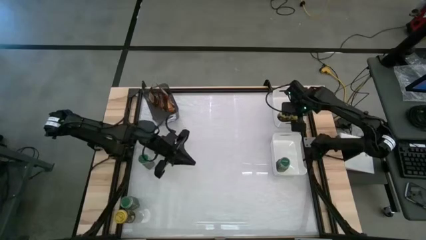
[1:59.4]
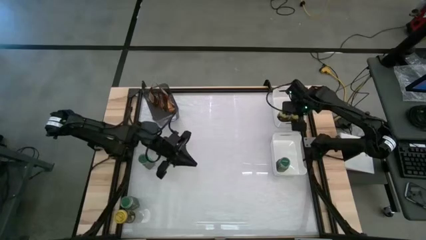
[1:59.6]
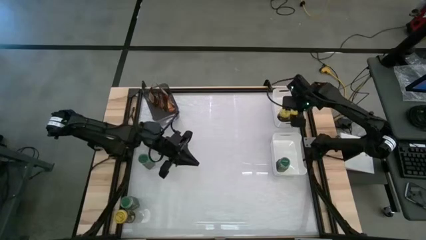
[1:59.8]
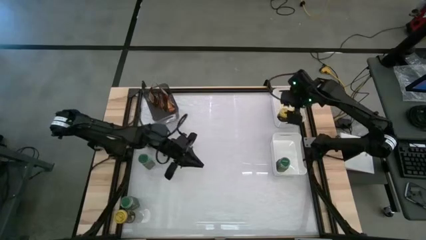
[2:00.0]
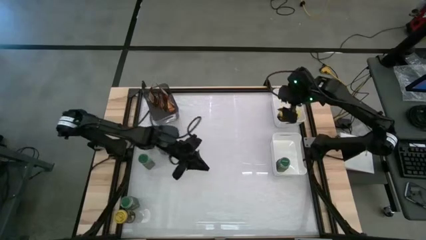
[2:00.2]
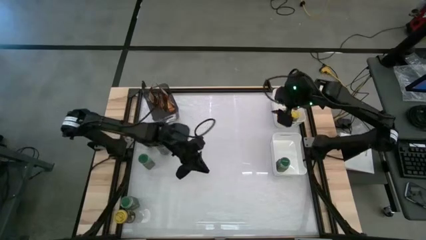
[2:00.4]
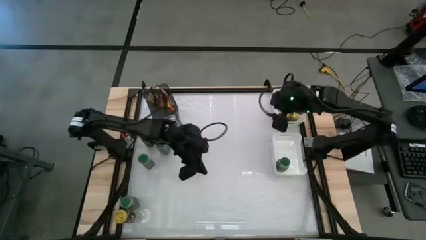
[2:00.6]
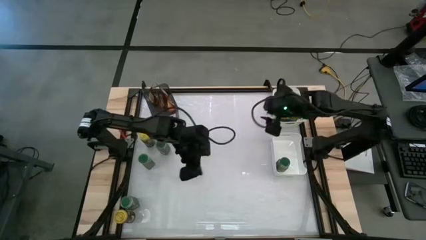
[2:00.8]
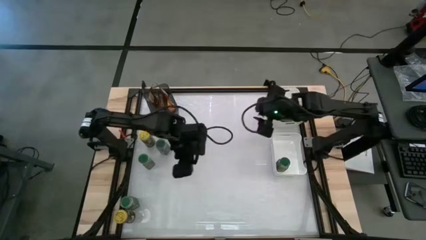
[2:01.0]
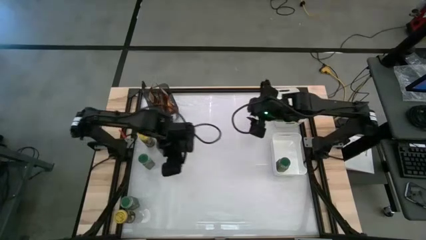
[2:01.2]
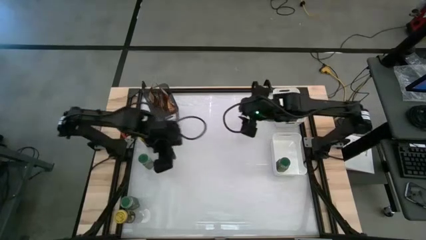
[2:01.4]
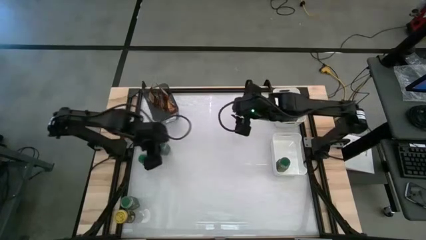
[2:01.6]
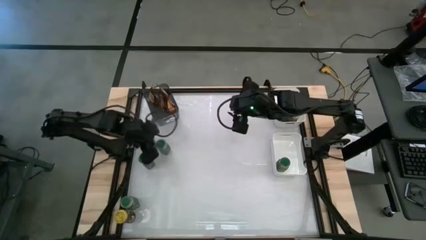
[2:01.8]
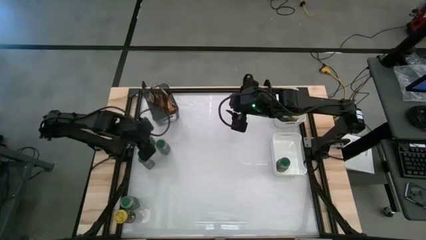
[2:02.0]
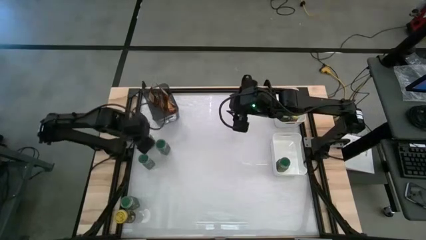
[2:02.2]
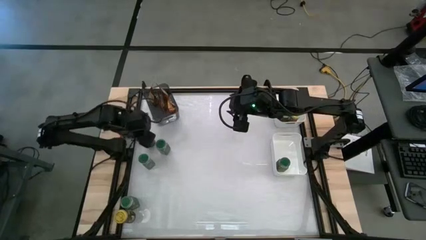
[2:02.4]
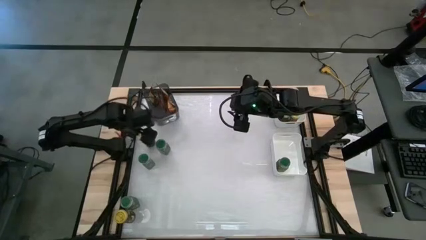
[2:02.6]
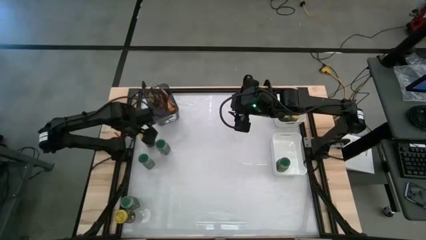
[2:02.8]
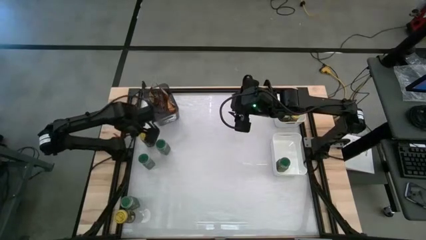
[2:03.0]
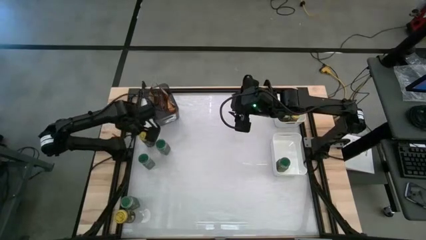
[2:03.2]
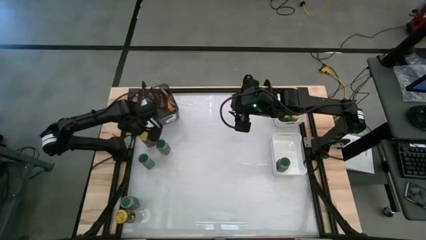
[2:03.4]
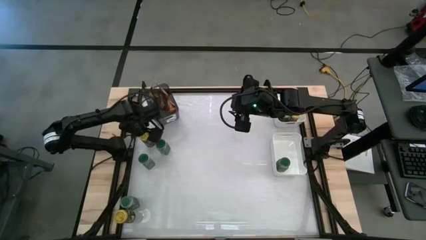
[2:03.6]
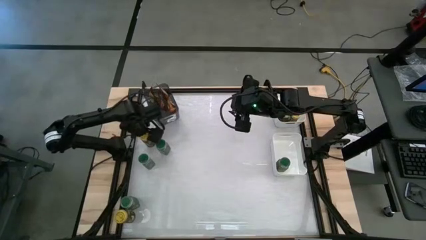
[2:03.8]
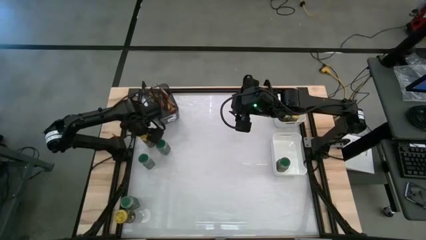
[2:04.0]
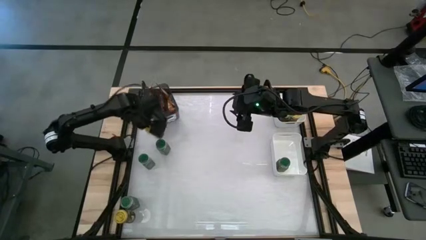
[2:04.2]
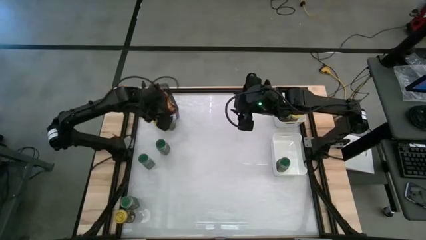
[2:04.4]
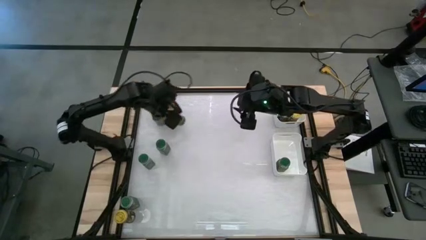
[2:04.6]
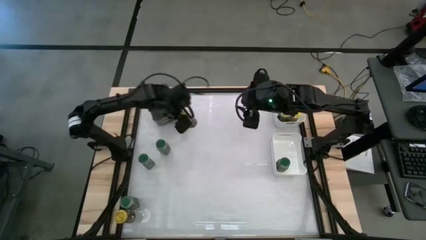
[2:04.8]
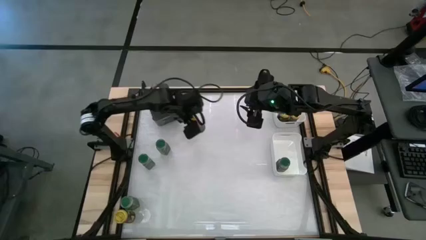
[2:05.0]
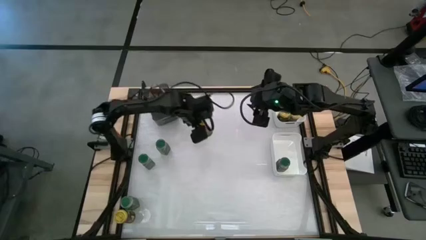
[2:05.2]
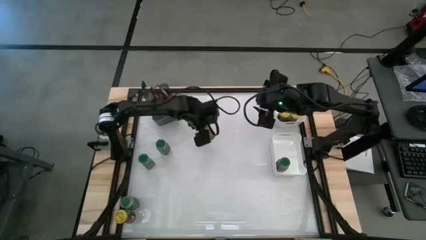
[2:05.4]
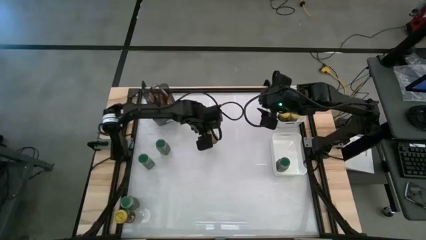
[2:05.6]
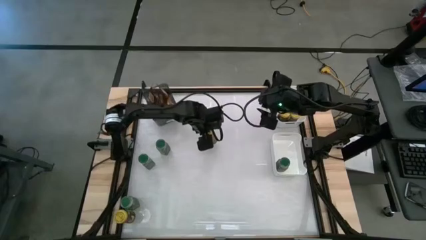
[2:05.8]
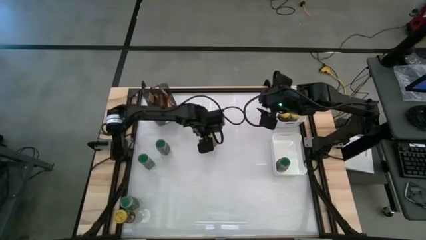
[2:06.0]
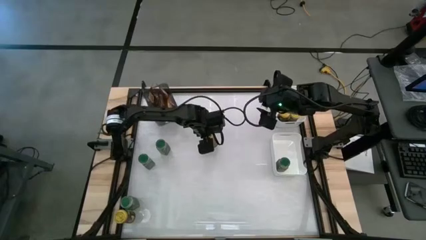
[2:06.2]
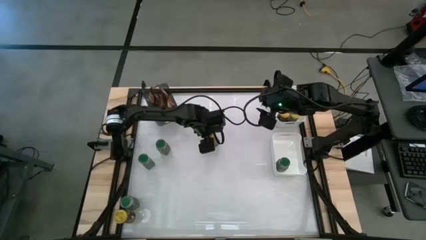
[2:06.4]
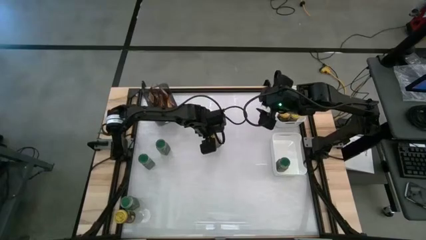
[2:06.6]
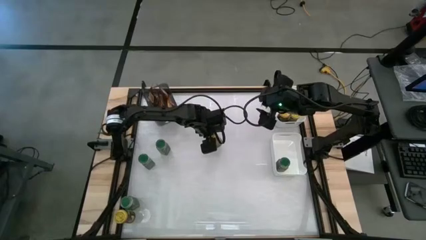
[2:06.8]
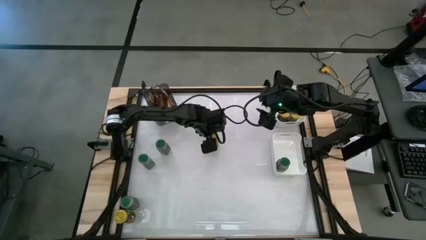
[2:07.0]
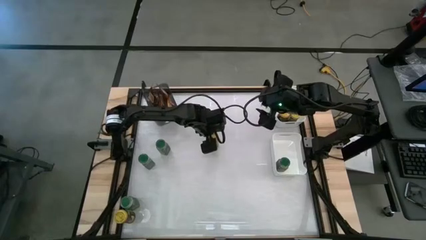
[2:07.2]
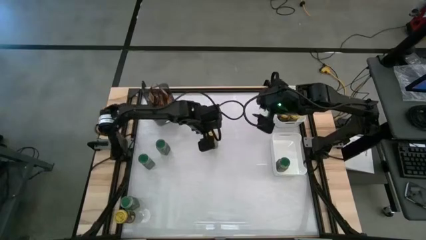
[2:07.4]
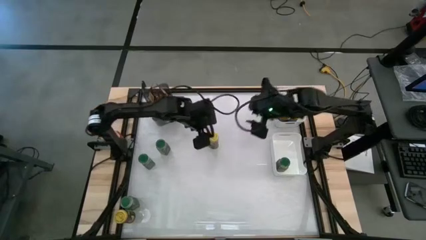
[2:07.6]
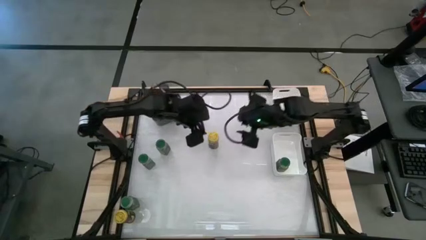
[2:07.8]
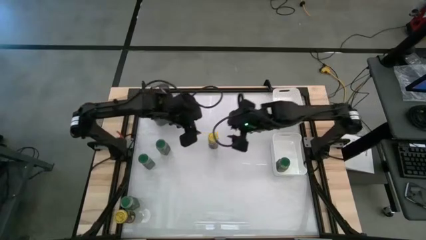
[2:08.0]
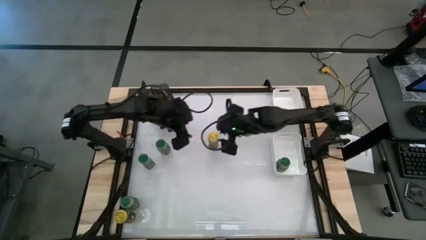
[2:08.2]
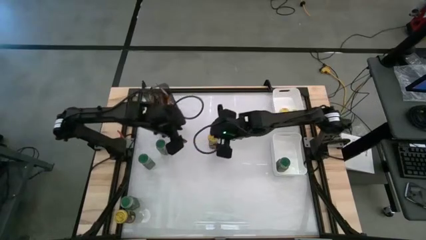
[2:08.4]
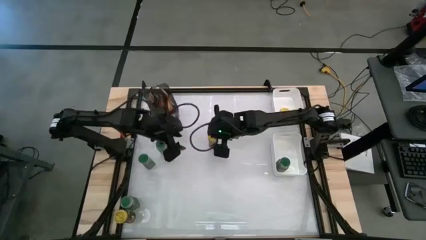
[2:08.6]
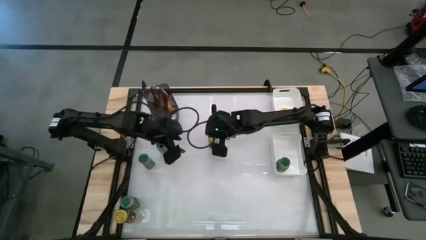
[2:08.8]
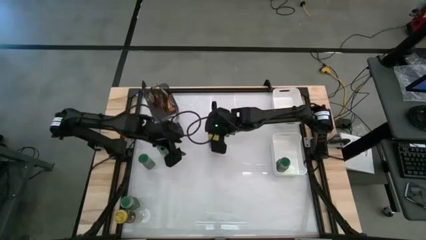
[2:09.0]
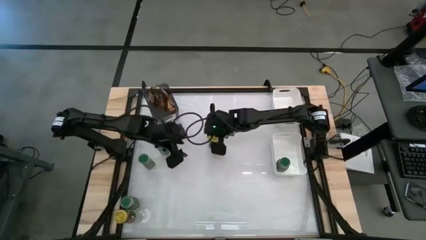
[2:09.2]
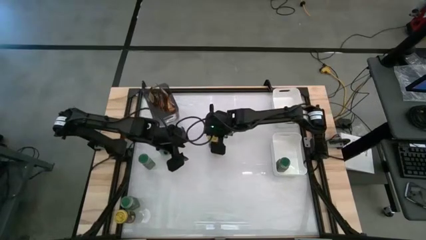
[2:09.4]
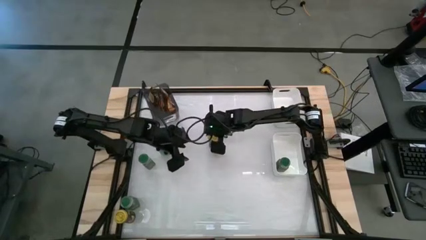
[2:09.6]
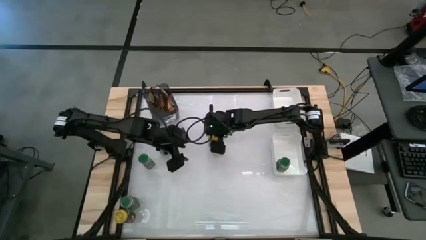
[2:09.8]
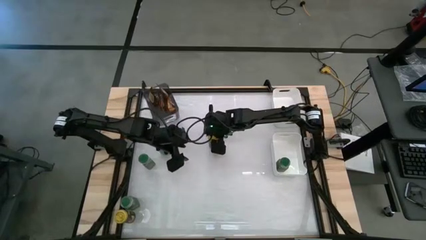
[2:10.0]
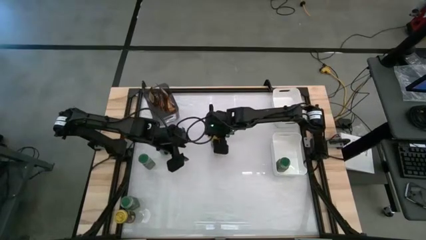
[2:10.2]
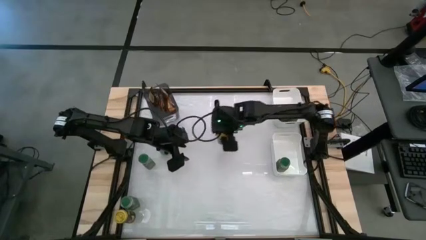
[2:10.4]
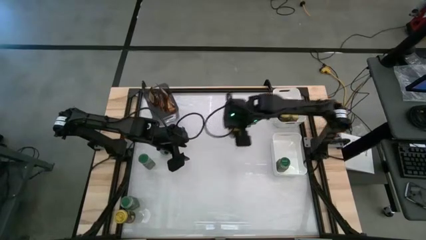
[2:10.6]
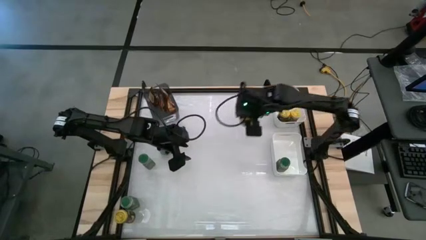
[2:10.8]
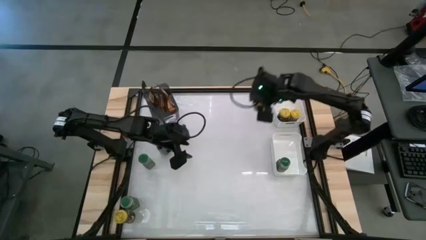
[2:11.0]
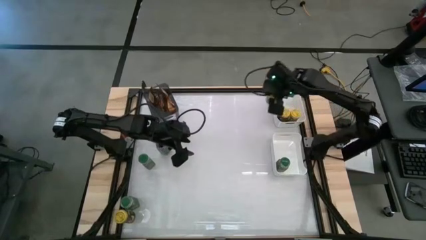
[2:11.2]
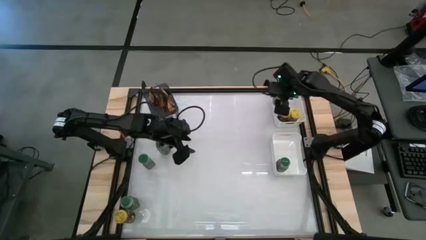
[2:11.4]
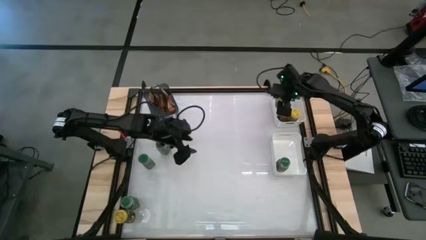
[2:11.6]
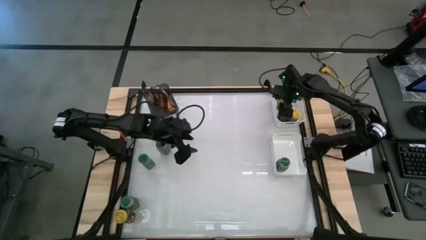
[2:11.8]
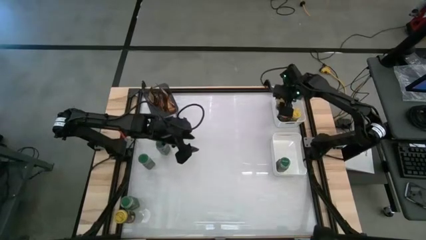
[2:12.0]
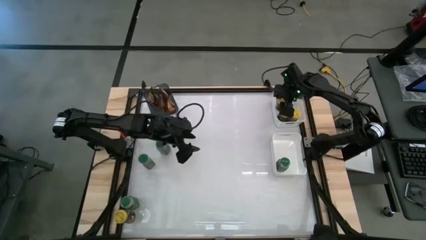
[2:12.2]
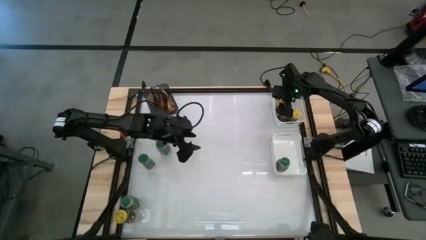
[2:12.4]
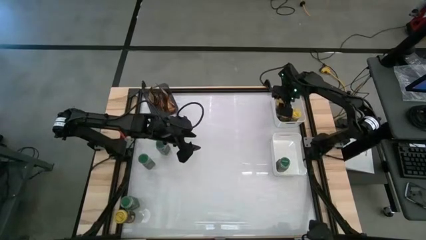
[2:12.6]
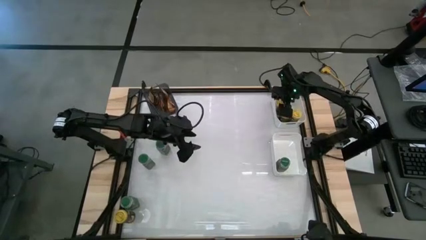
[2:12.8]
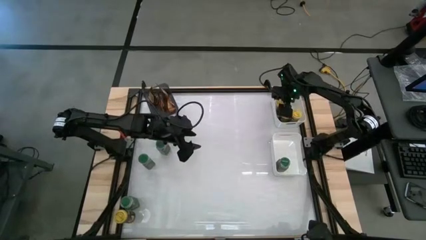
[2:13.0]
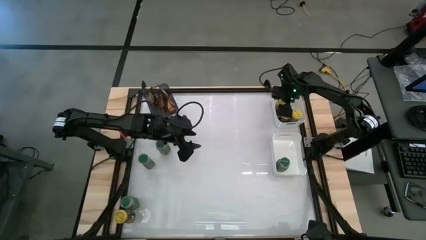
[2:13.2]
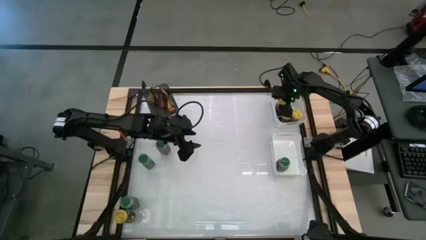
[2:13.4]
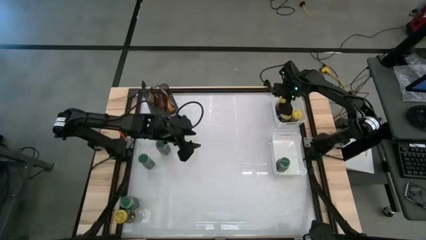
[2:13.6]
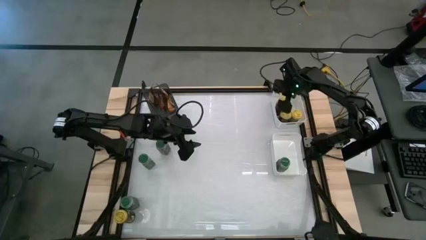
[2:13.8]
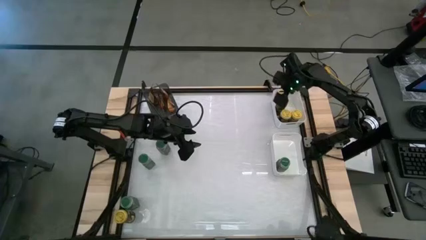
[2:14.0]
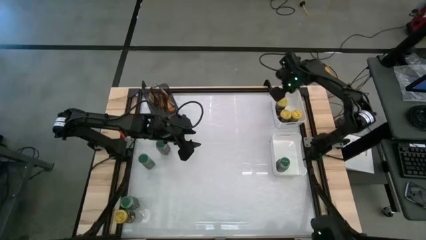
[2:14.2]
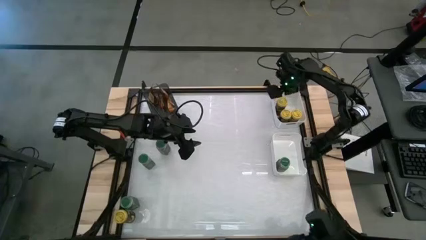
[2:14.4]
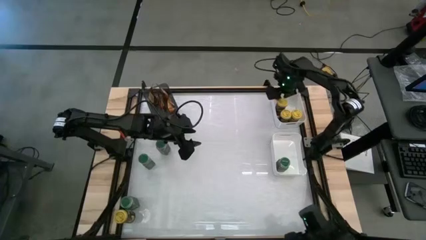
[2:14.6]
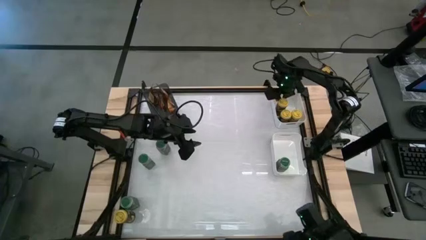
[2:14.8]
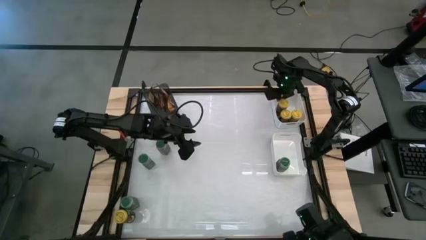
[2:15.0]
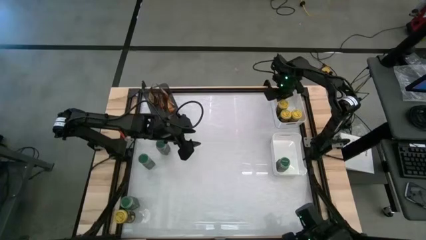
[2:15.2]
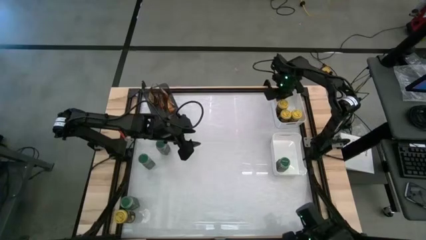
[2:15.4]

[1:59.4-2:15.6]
Task: Sort spices by type
Put the yellow seasoning bottle into the top white bin
